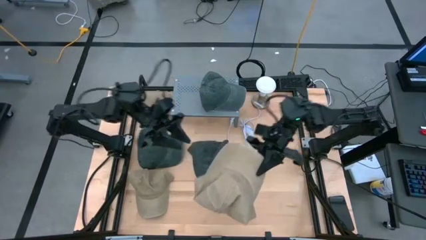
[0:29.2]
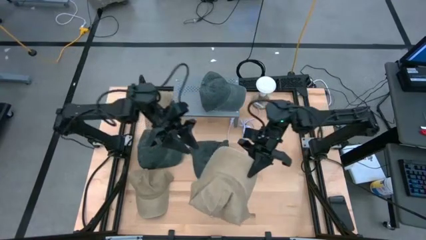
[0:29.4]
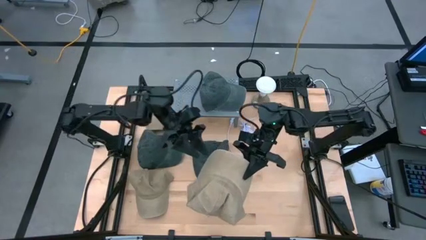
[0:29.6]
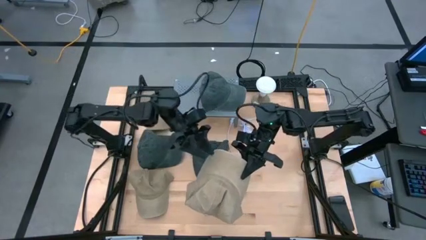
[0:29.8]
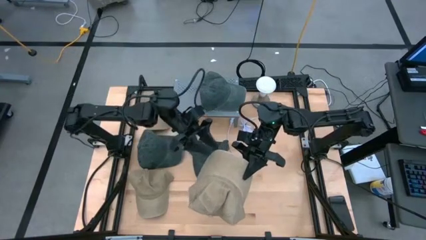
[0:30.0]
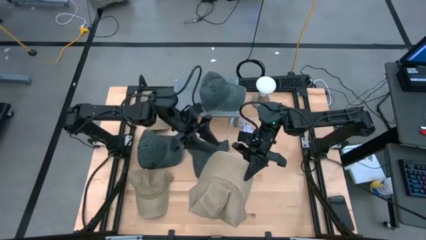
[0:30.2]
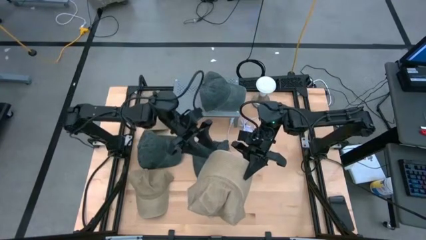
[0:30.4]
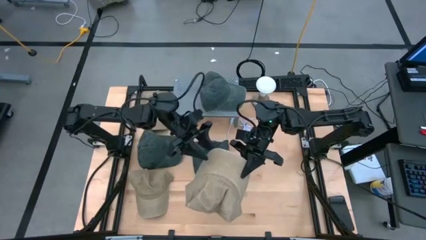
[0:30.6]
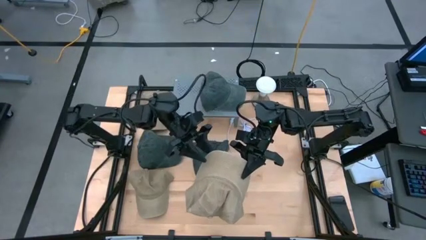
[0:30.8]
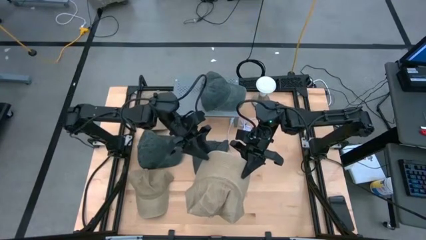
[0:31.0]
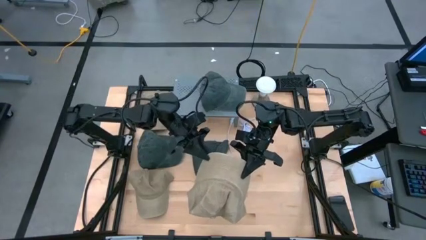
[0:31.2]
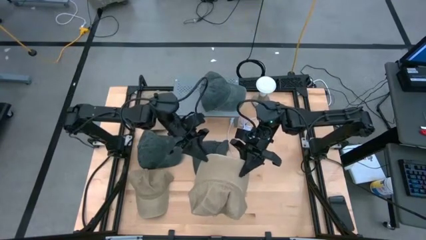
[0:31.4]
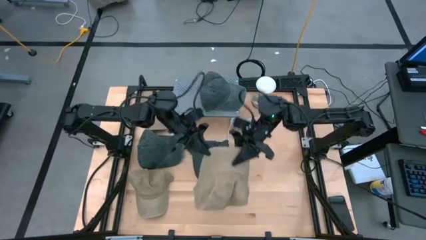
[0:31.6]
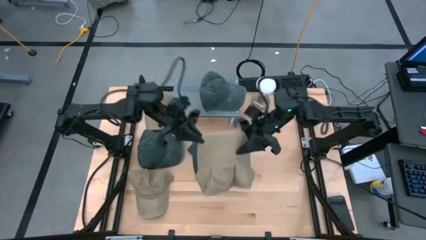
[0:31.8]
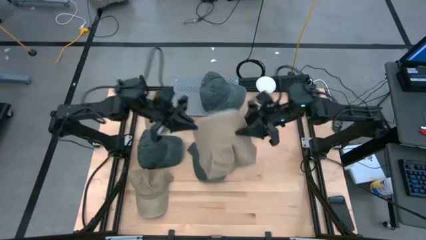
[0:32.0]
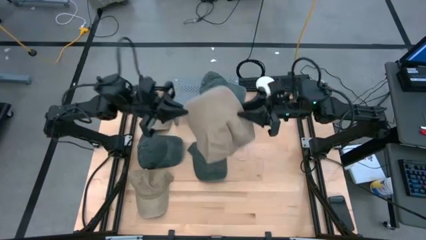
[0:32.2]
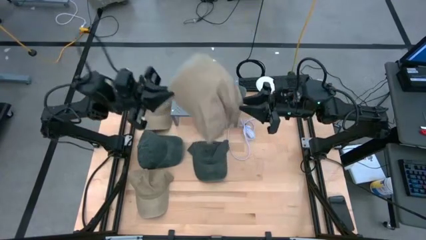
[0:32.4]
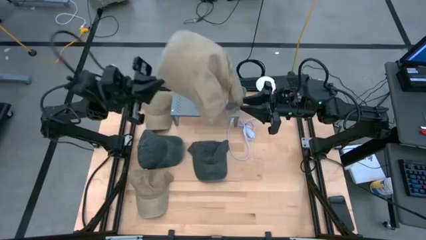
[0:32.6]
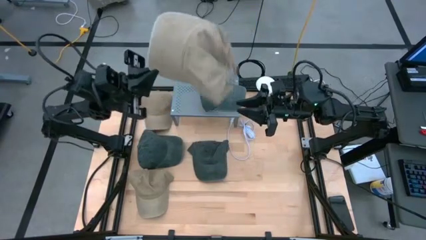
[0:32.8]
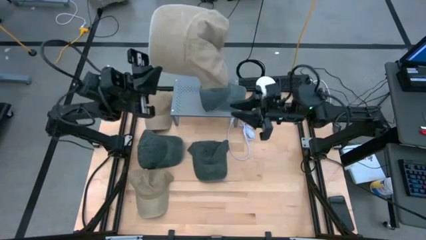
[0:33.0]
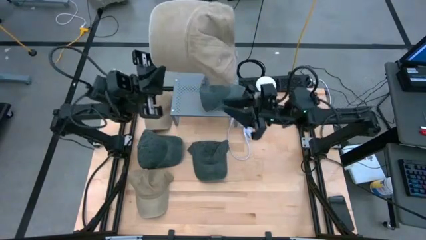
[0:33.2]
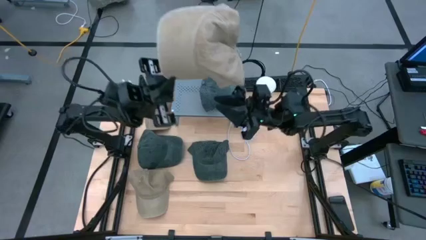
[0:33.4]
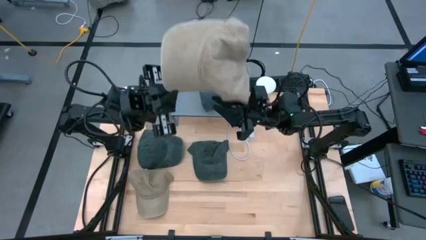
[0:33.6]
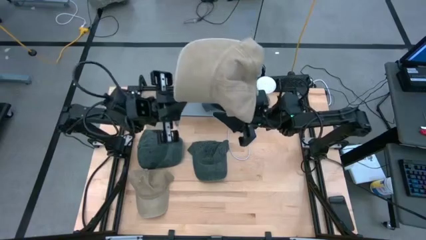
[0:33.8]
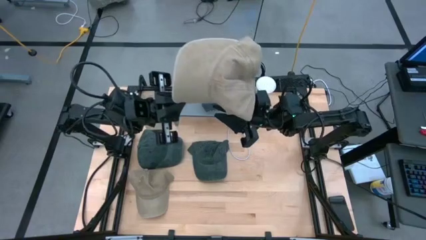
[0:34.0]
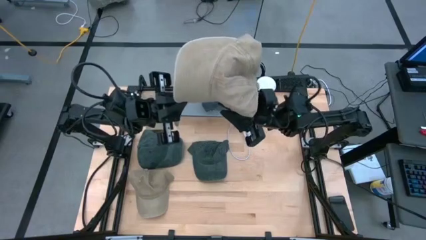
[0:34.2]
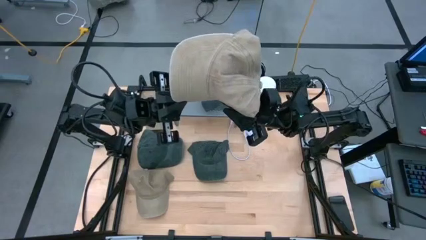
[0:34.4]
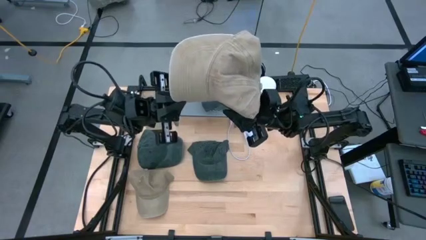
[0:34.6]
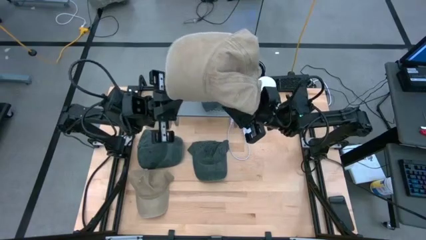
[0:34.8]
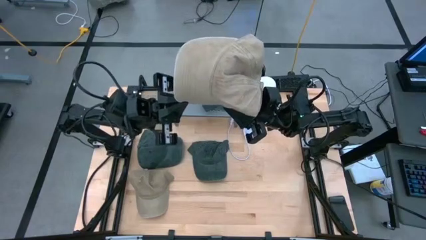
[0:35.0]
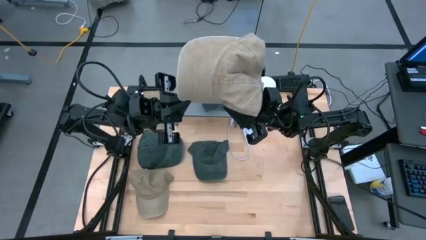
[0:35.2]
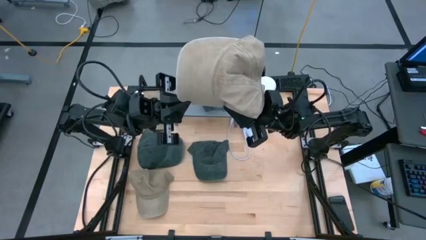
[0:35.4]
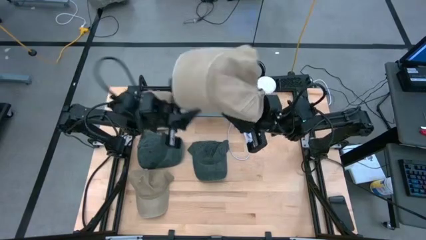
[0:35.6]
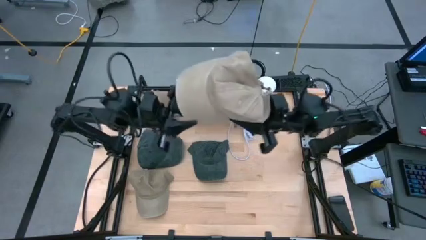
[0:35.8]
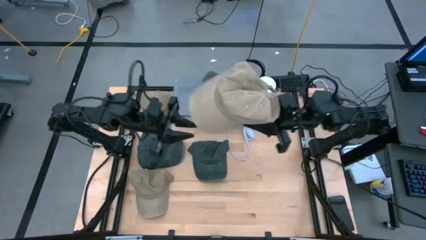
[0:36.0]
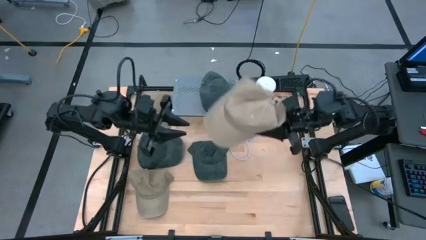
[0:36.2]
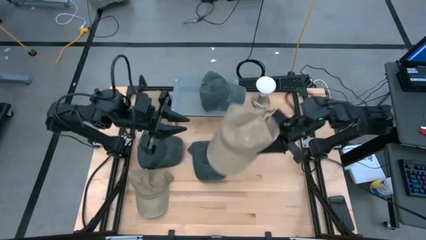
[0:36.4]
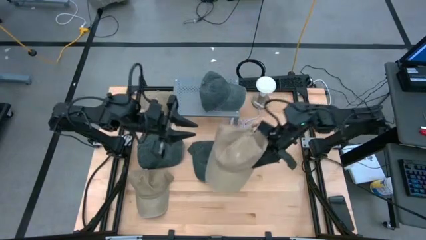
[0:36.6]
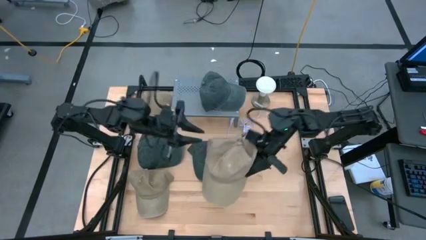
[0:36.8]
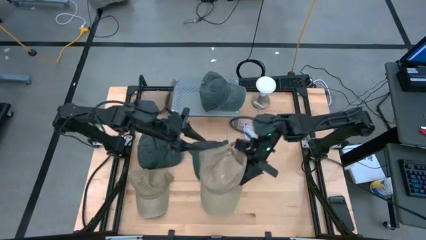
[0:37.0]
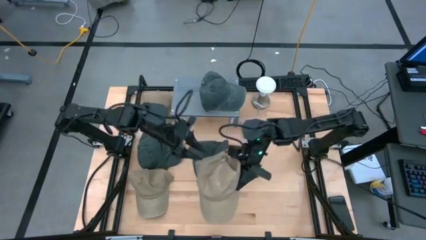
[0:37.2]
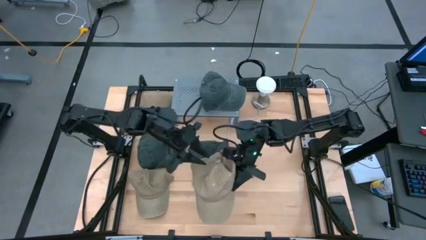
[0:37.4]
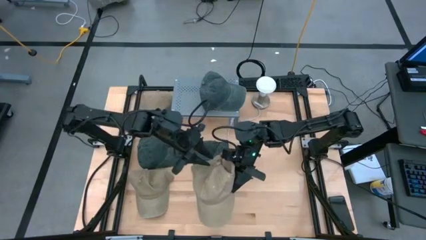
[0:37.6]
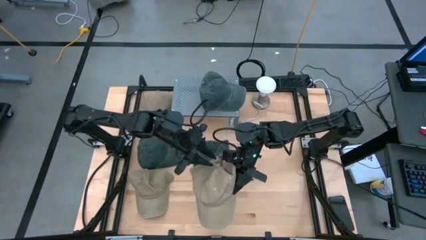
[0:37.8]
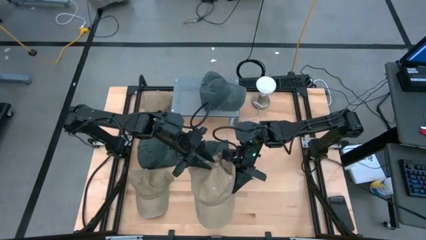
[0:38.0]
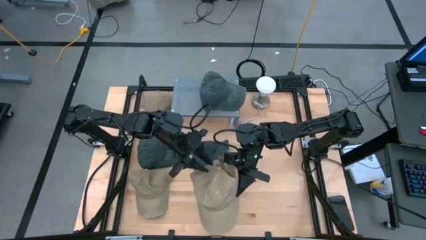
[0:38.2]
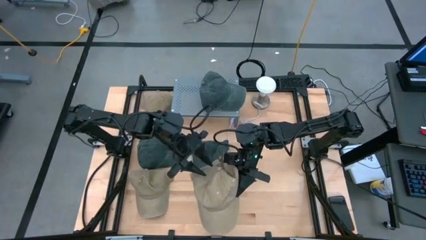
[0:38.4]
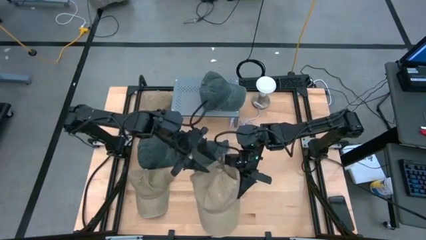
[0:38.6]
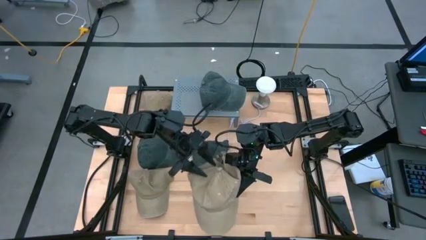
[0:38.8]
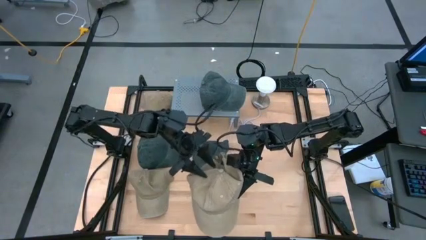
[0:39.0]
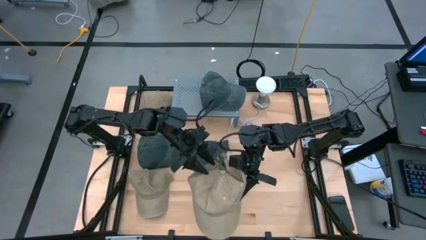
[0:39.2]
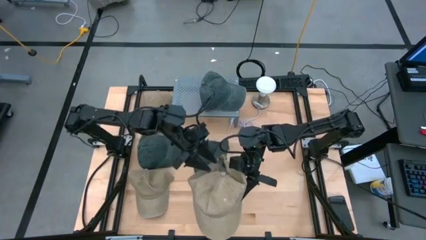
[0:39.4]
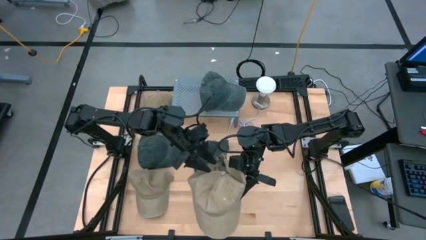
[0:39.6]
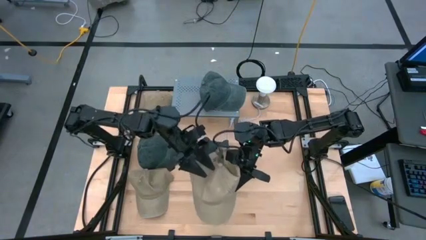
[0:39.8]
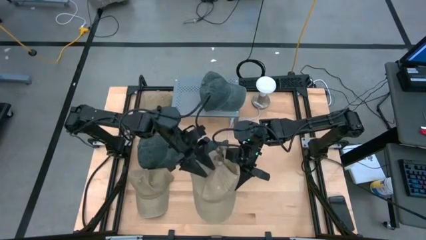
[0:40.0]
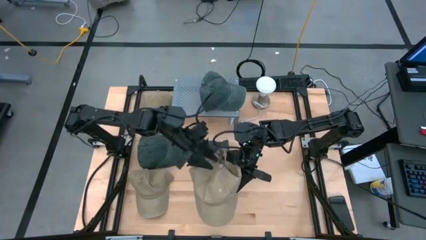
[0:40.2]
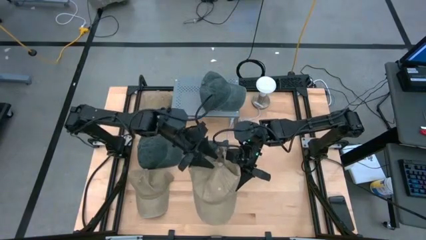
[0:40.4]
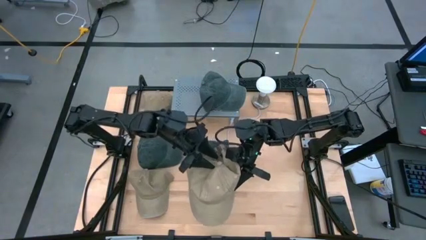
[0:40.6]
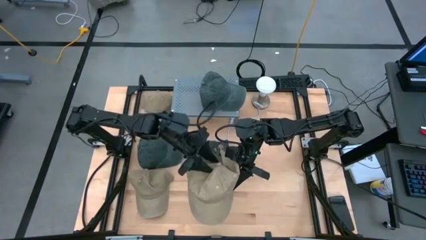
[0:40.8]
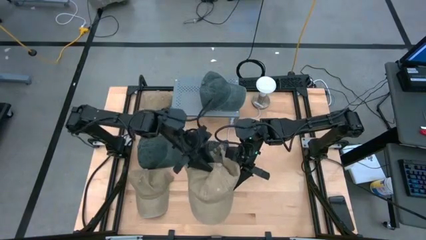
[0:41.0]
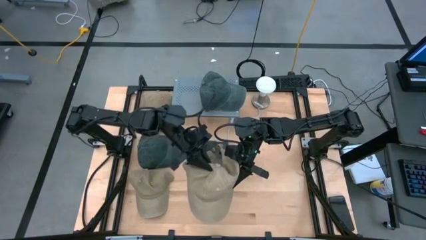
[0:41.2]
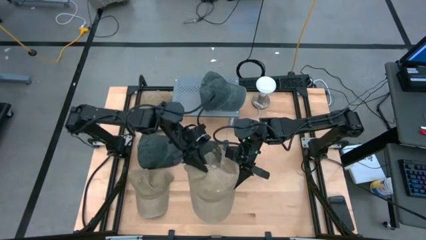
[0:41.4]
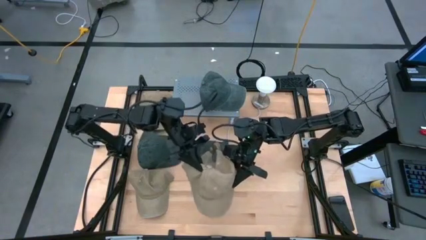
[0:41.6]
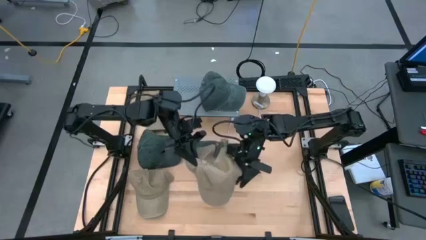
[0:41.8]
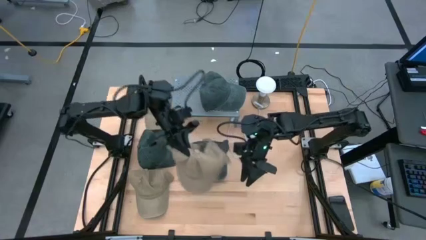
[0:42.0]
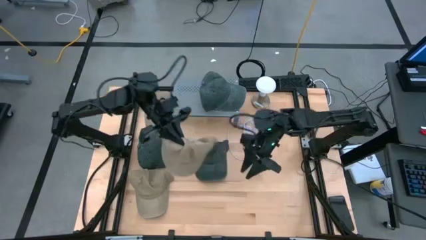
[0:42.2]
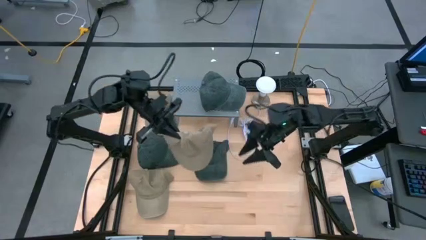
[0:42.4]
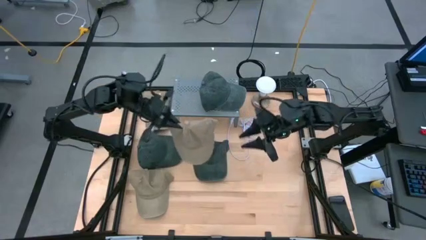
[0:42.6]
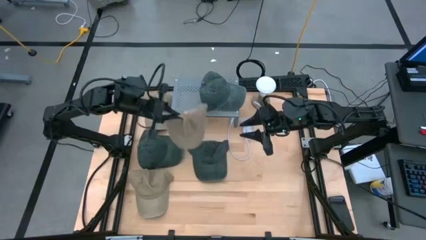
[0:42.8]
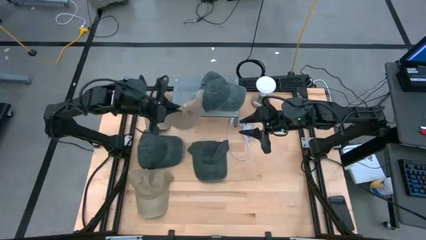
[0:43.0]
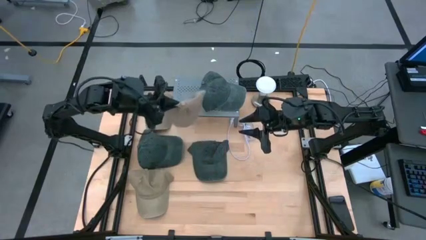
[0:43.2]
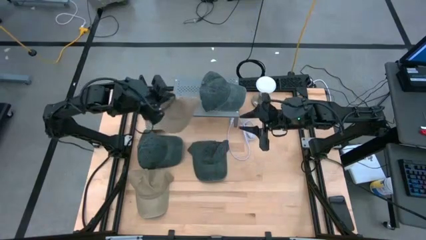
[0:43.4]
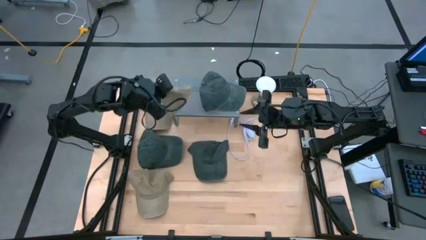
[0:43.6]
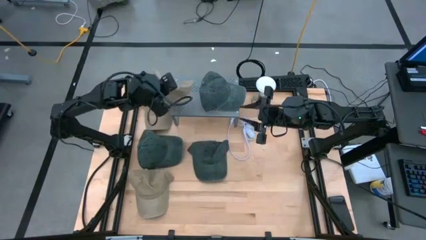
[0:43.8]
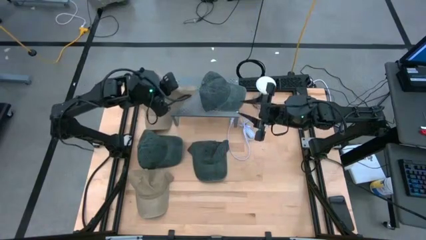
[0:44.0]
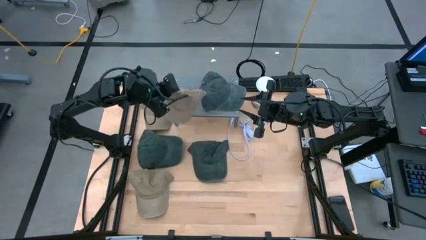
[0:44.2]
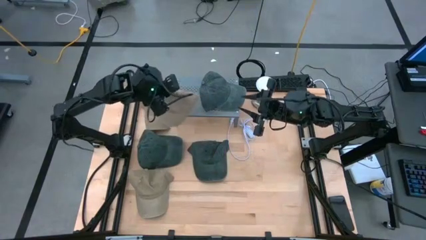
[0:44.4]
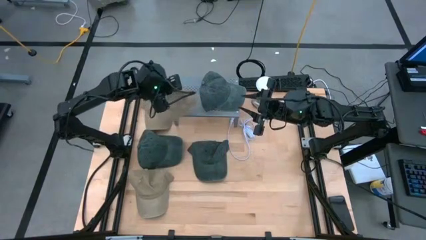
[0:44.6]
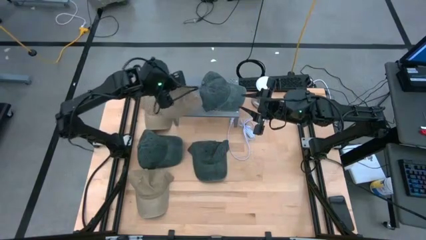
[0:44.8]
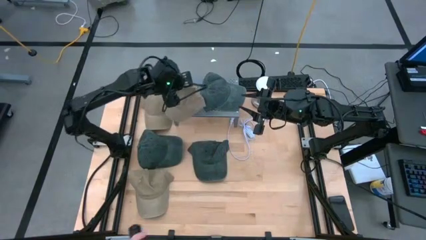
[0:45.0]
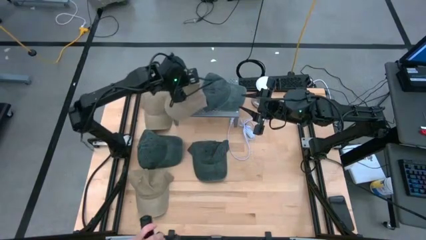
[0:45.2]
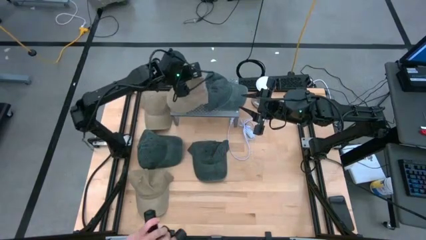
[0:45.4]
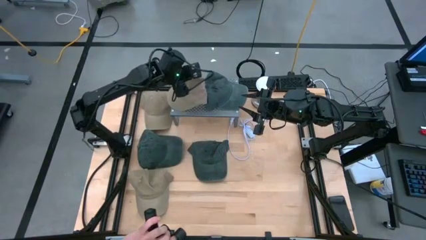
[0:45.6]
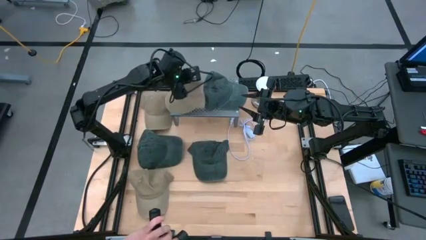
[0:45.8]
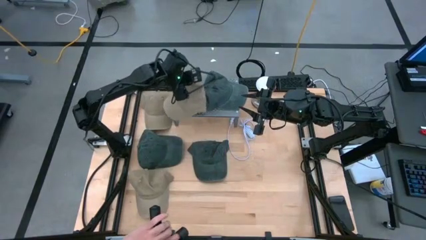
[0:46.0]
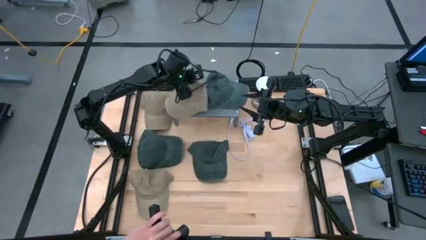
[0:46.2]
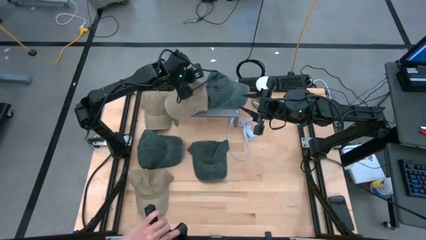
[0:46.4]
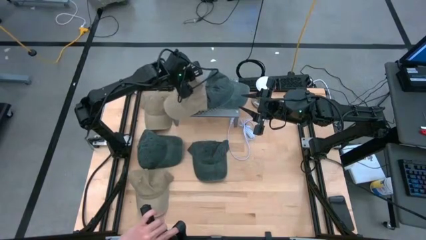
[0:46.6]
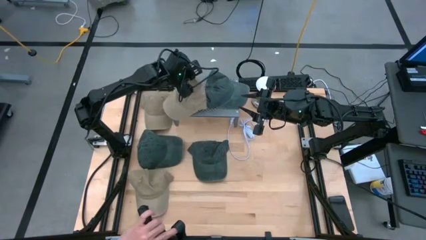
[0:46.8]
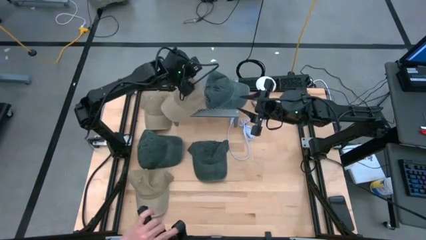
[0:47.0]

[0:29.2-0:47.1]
Task: Pick & Place hat
Put the right brown cap on the shelf
